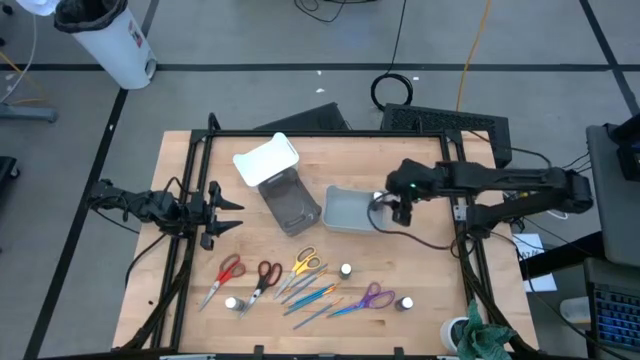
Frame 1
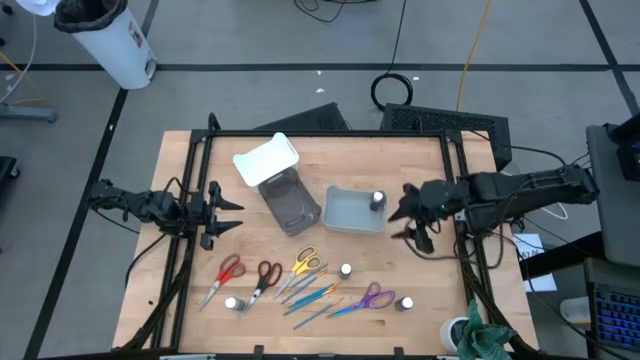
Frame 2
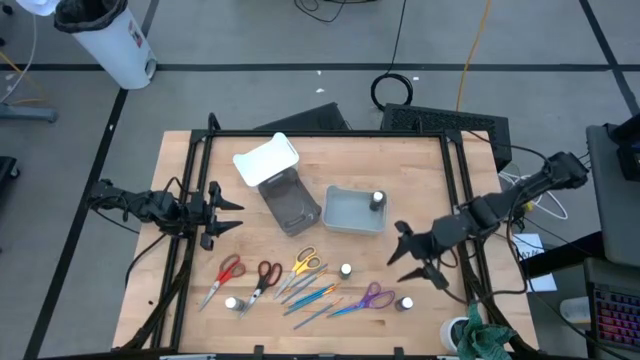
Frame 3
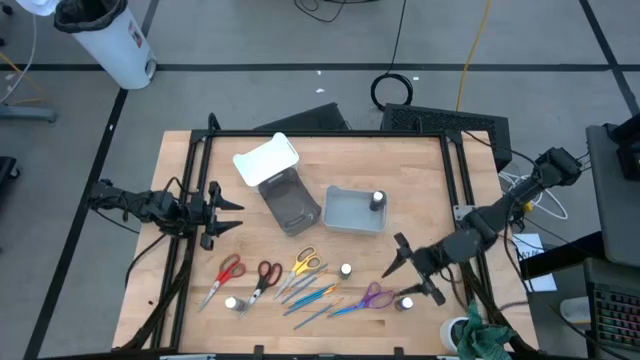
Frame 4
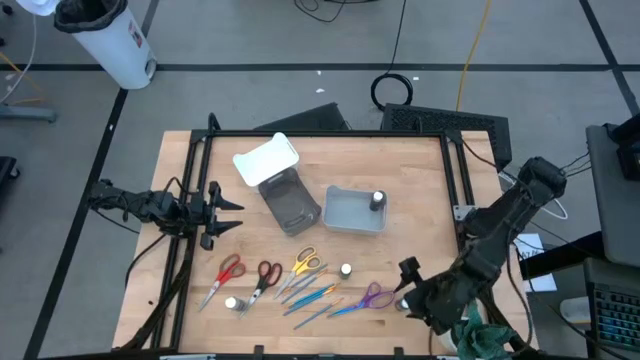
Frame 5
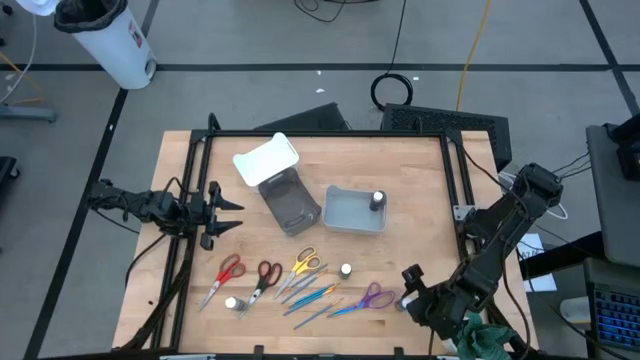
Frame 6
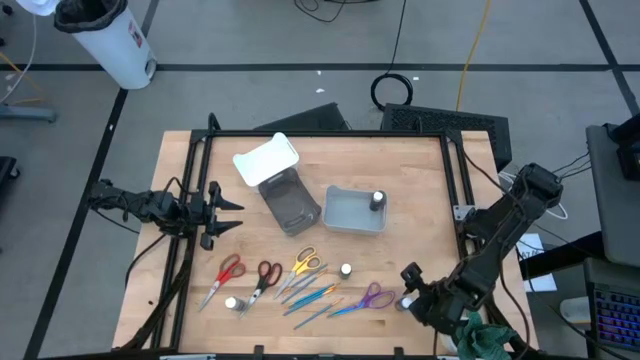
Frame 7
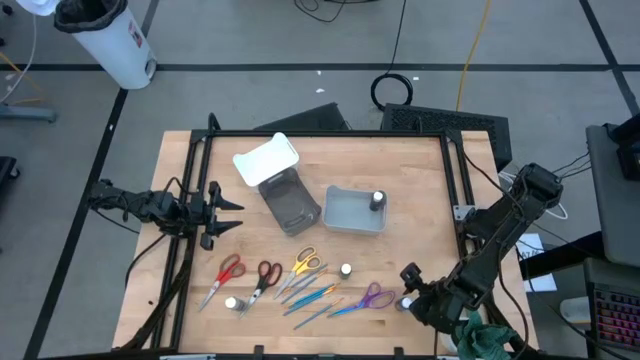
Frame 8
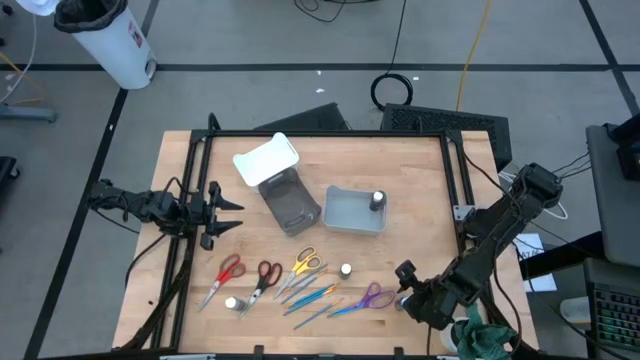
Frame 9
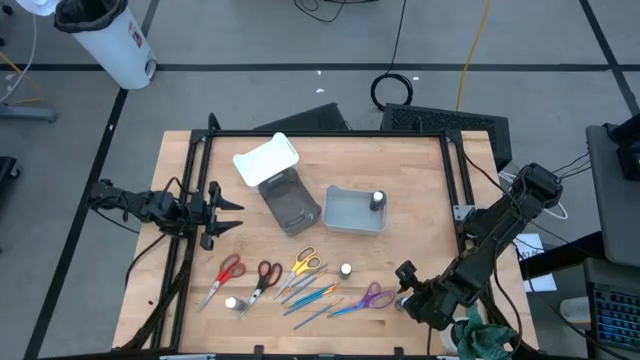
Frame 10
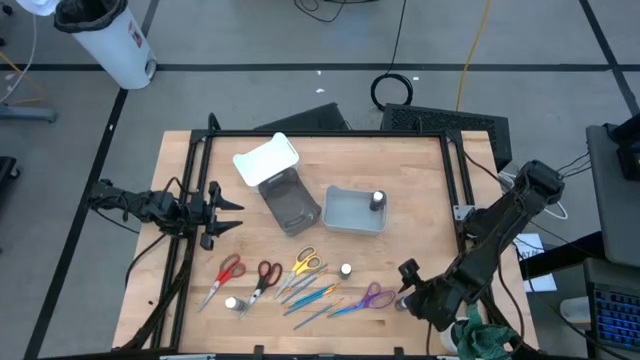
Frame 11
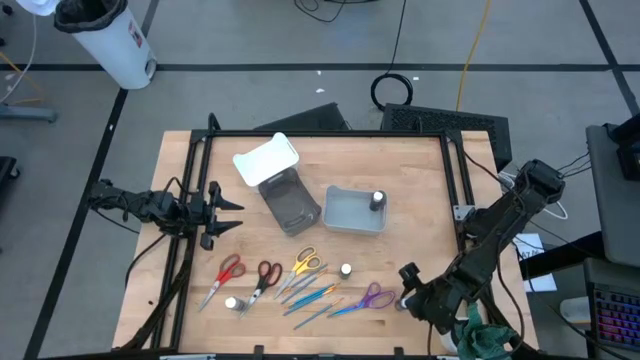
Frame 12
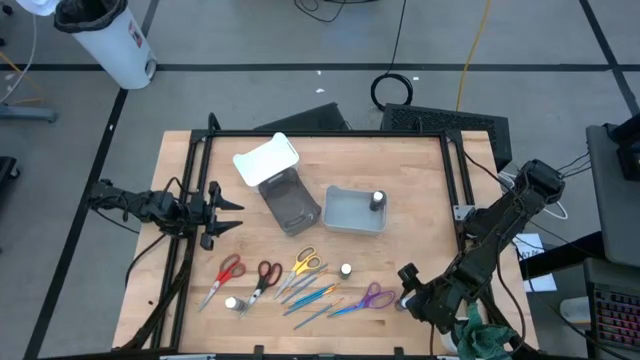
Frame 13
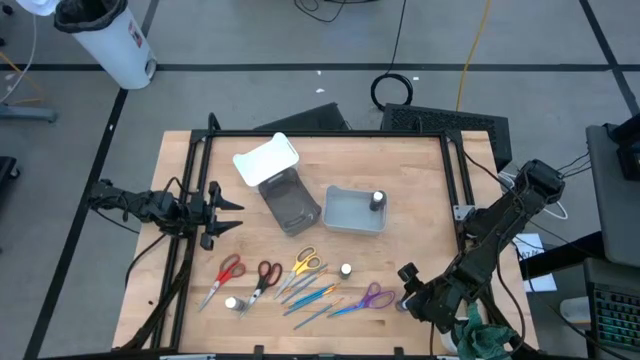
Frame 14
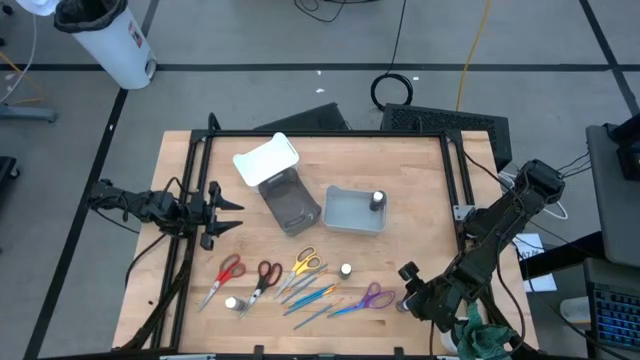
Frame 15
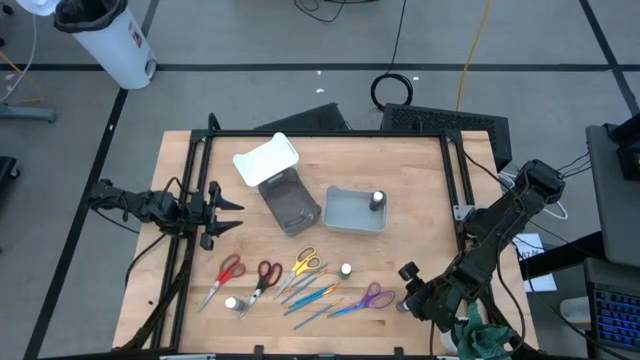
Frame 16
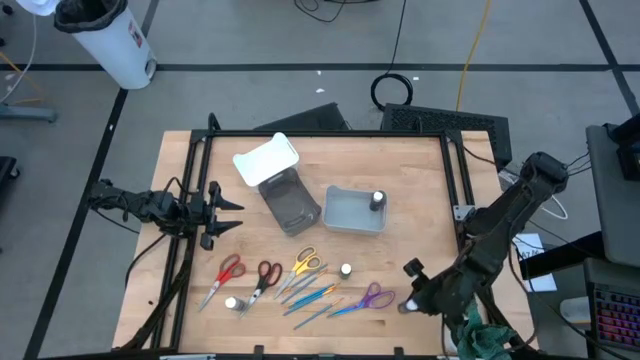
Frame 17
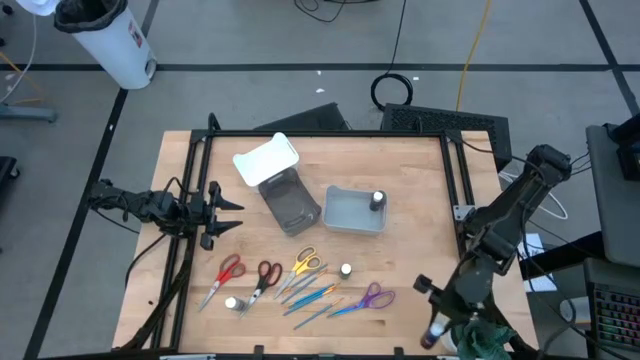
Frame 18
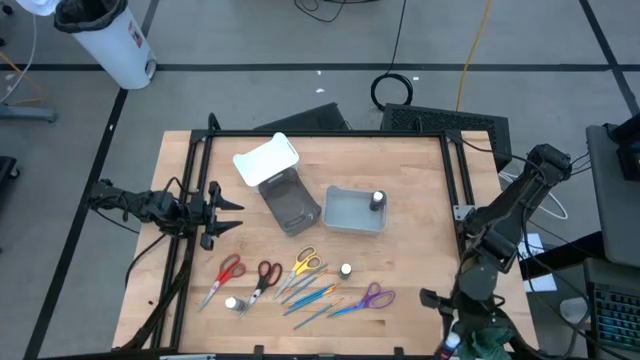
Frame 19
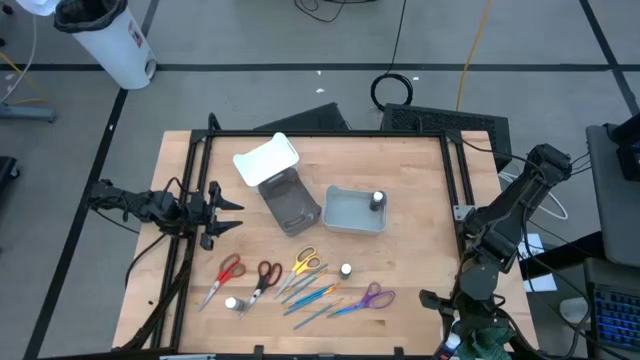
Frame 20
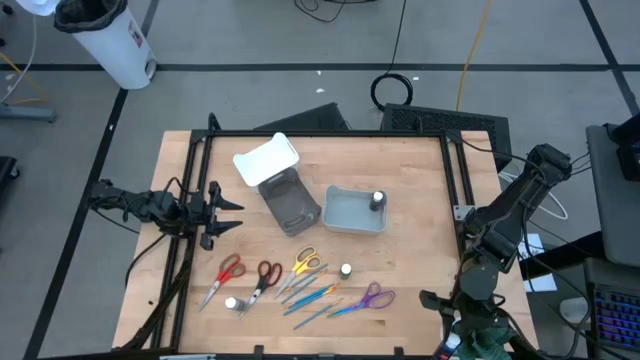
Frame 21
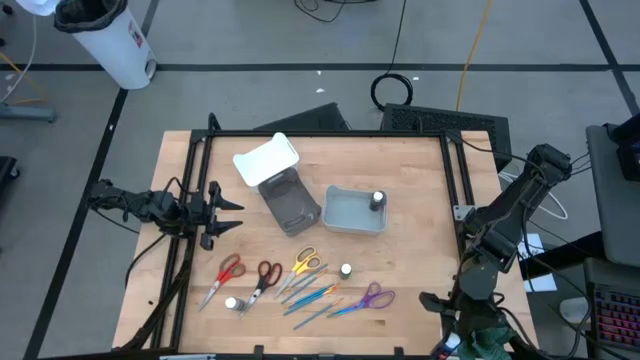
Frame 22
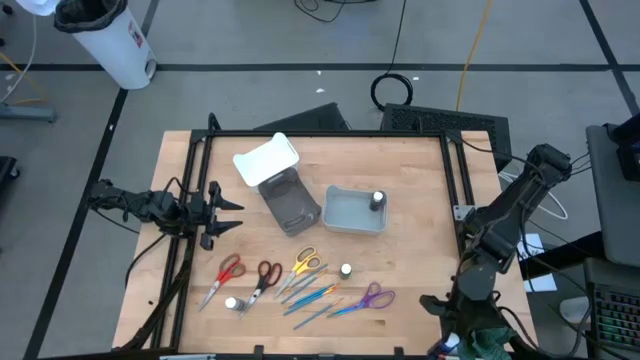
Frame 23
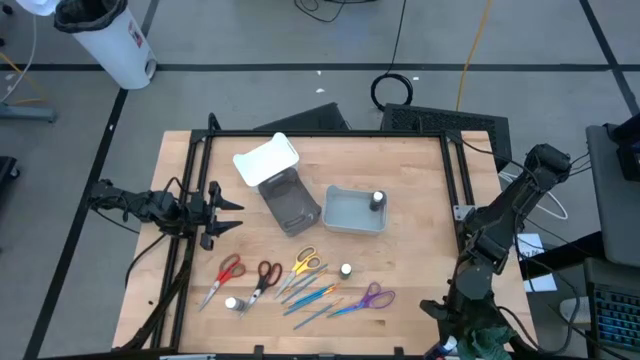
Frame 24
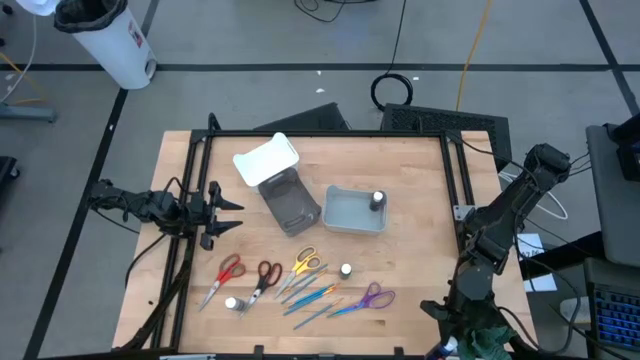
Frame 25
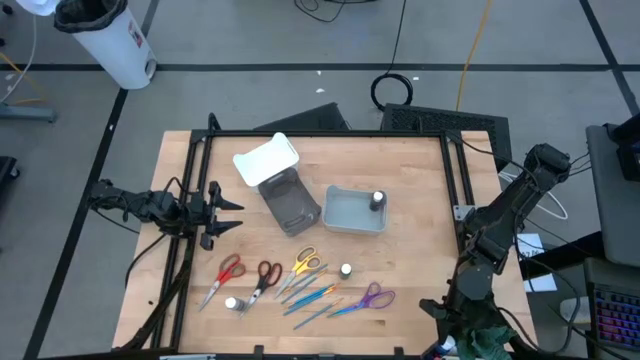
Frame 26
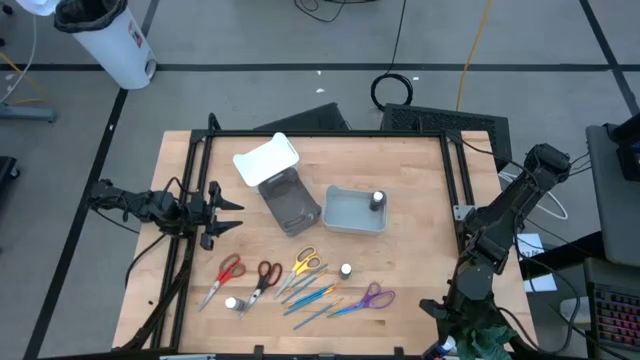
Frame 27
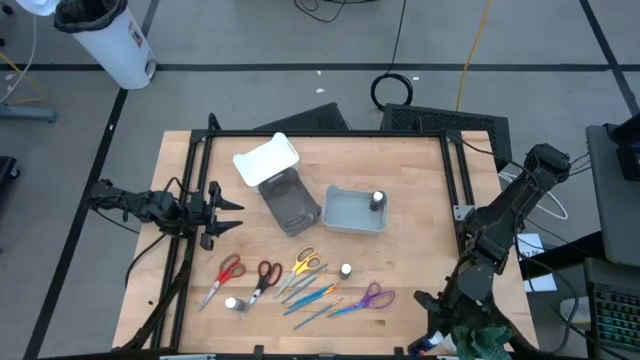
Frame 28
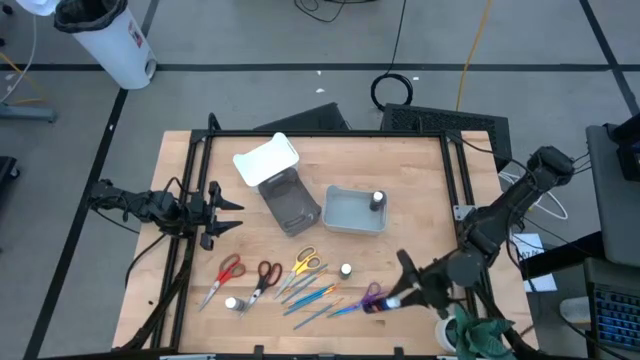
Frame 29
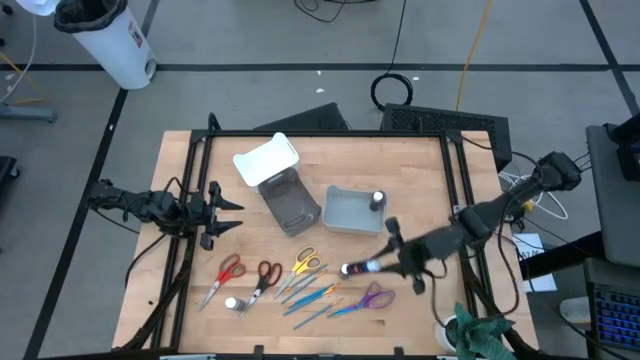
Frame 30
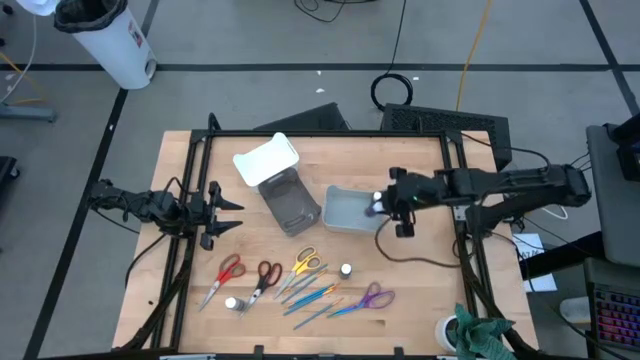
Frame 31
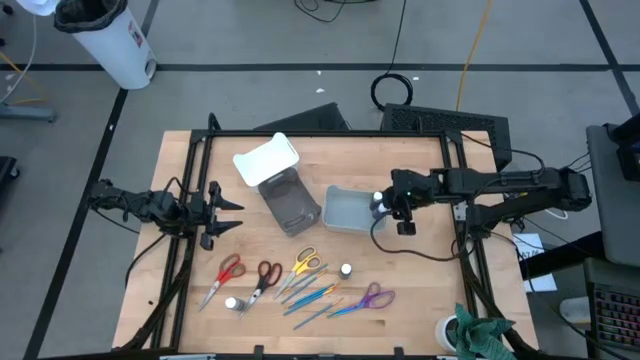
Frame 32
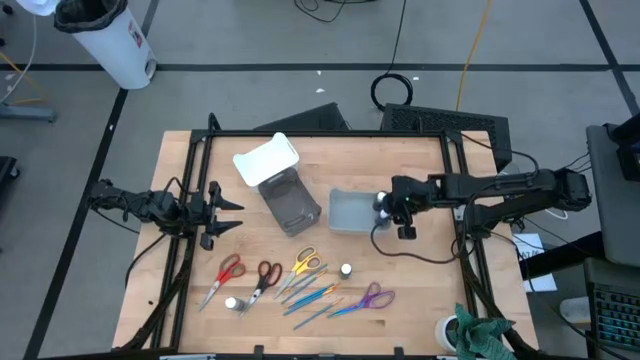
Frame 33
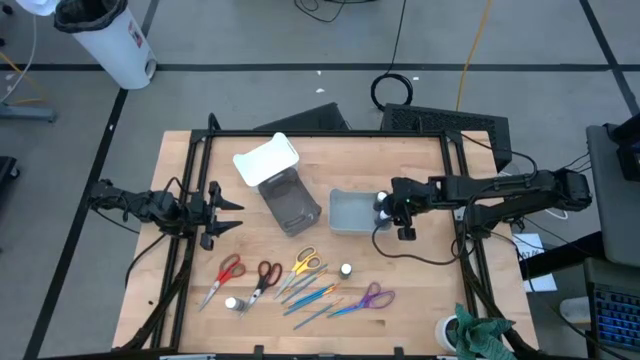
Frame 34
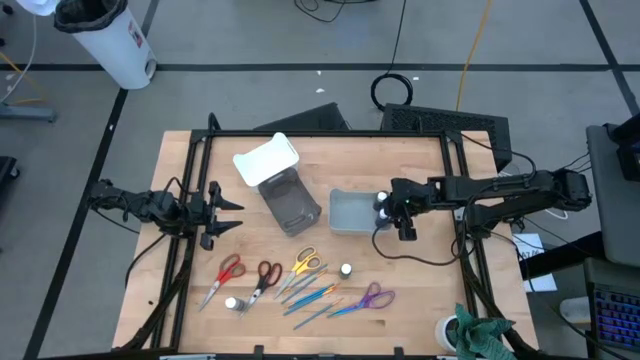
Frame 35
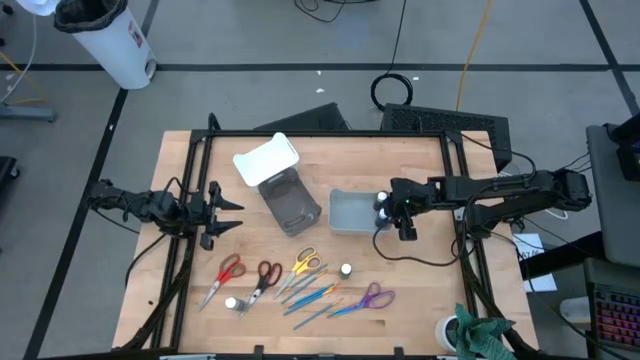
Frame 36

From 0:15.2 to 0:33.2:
Task: Pick & Place Paint Supplies
Put the blue paint bottle into the gray bin

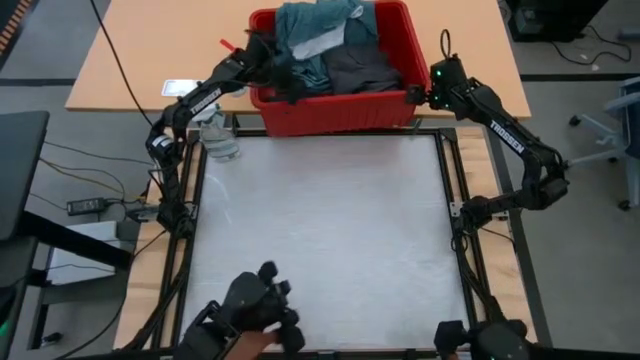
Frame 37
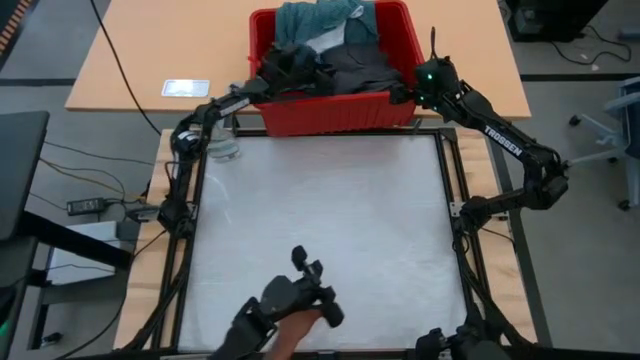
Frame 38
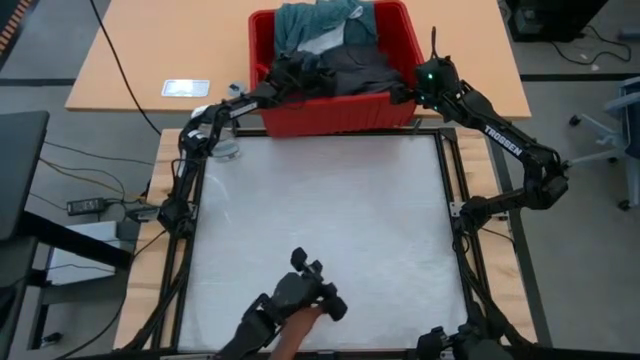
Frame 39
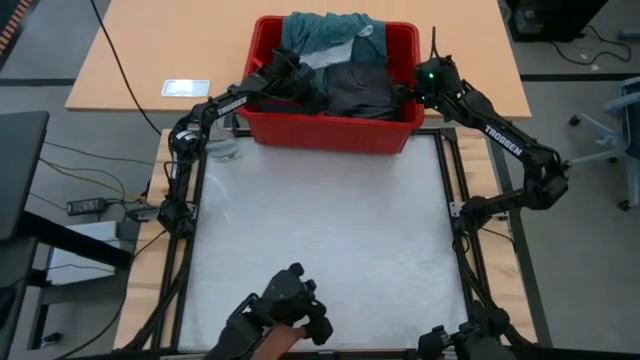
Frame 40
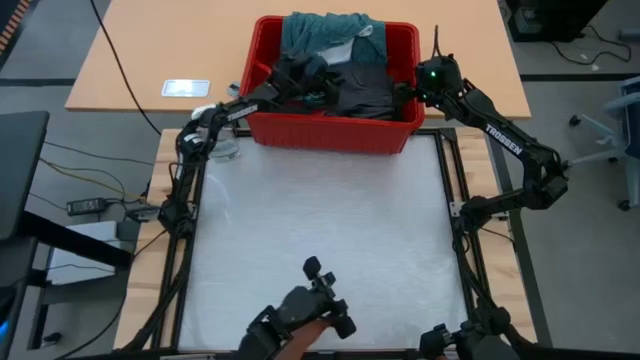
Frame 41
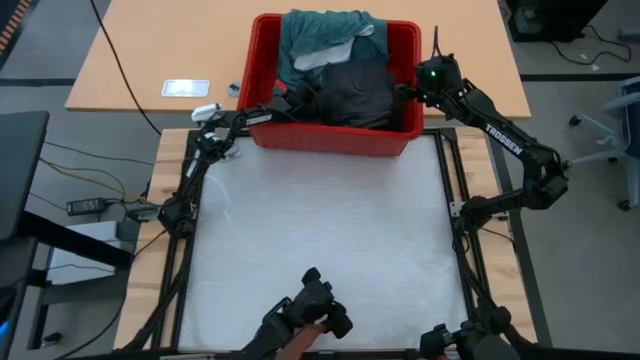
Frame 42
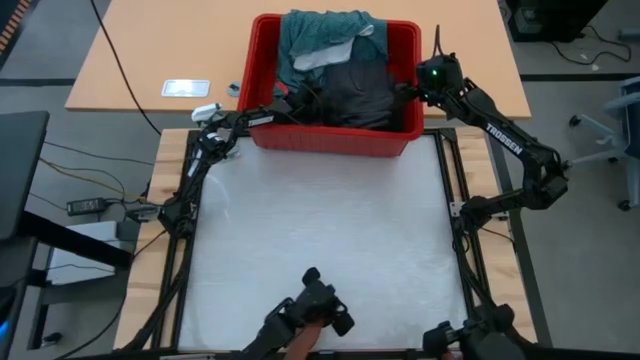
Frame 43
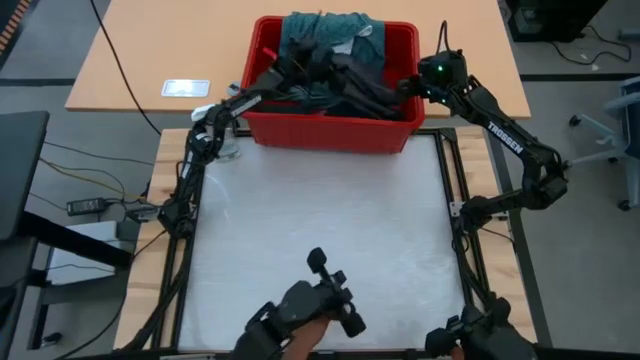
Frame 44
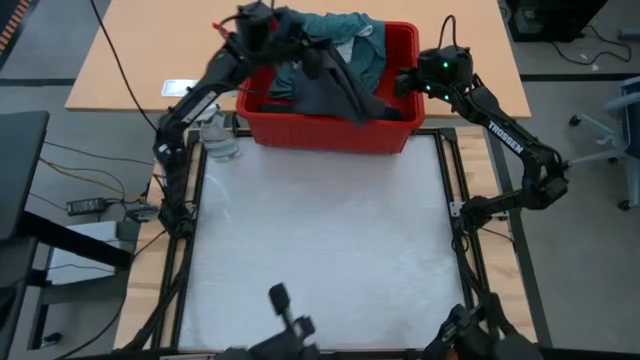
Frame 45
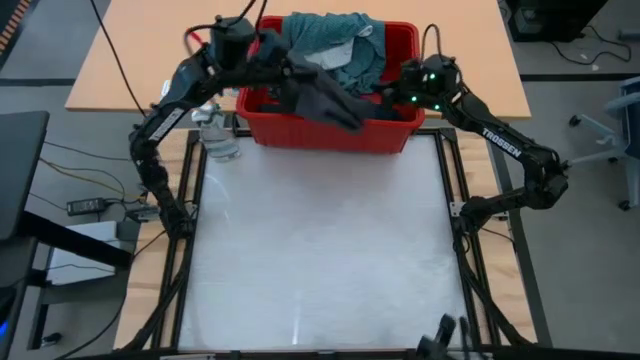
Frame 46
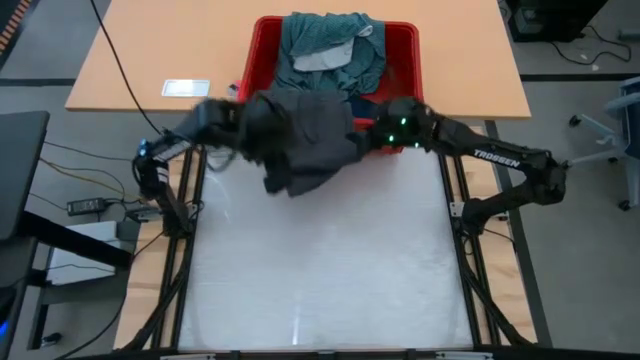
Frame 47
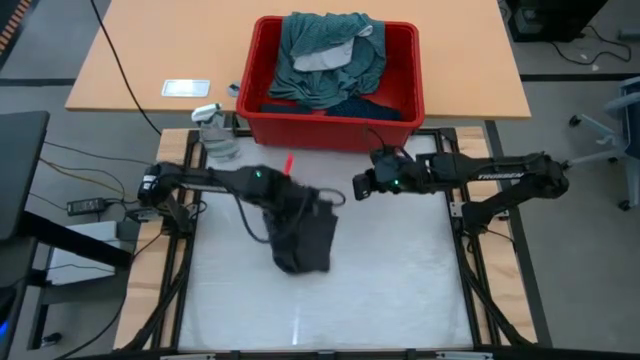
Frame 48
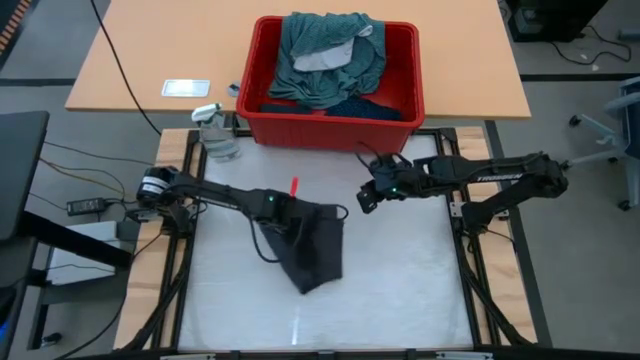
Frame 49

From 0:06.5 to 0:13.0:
Task: Fold Laundry from Bin
Put the gray short on the table
